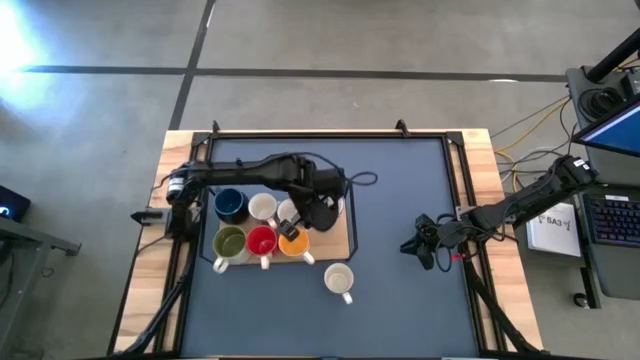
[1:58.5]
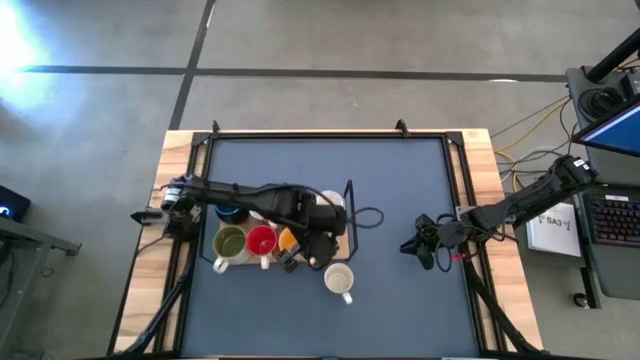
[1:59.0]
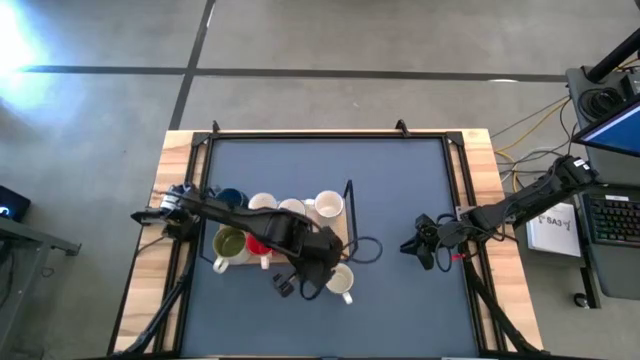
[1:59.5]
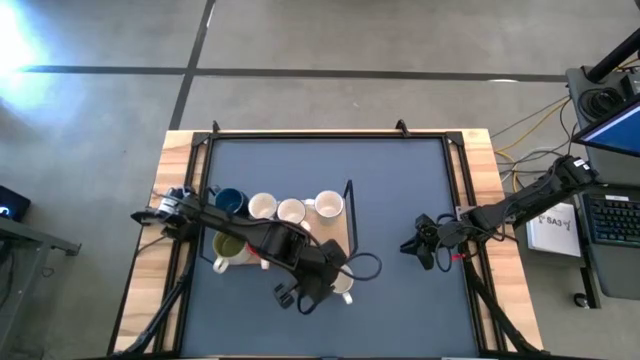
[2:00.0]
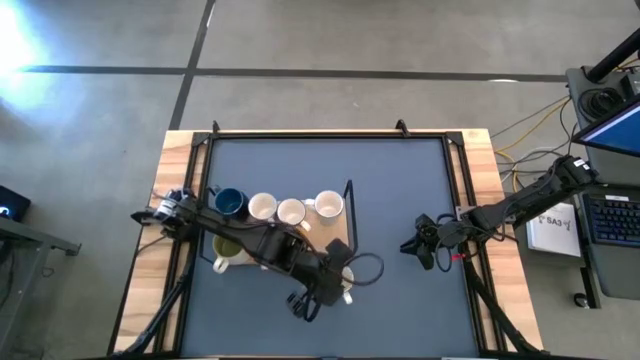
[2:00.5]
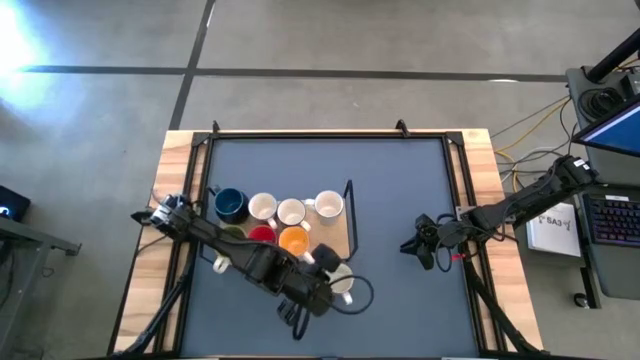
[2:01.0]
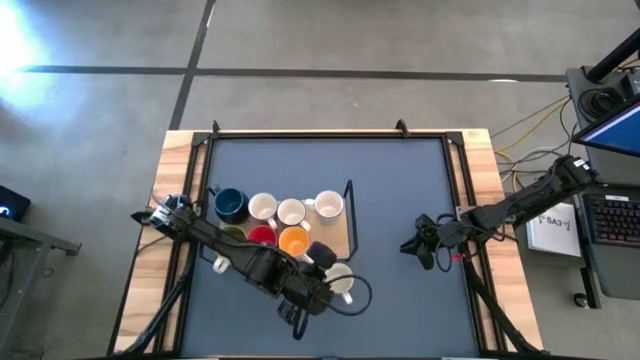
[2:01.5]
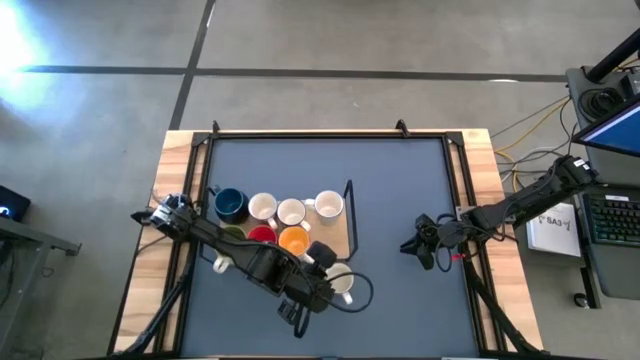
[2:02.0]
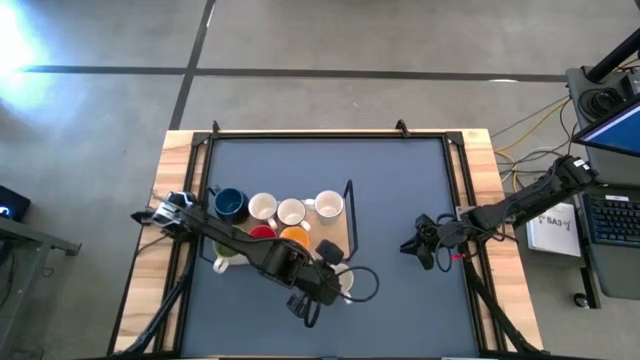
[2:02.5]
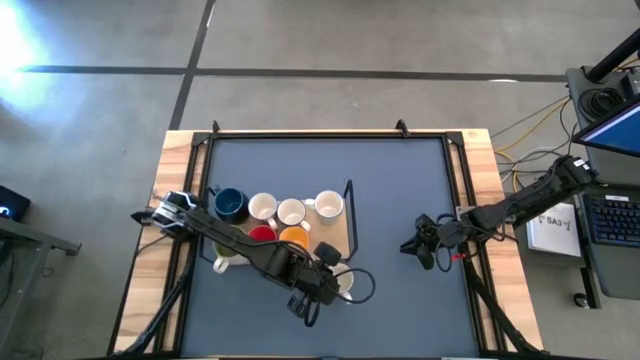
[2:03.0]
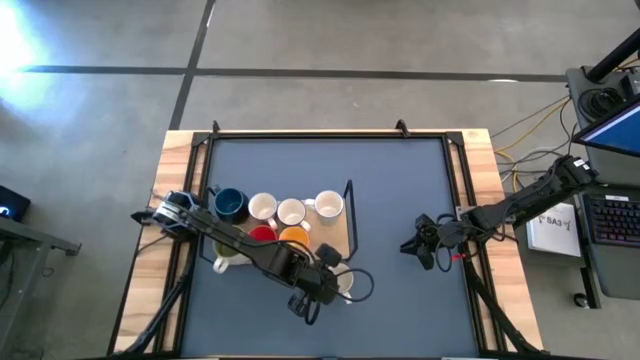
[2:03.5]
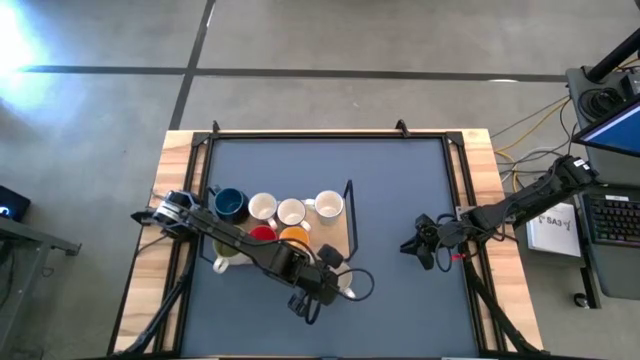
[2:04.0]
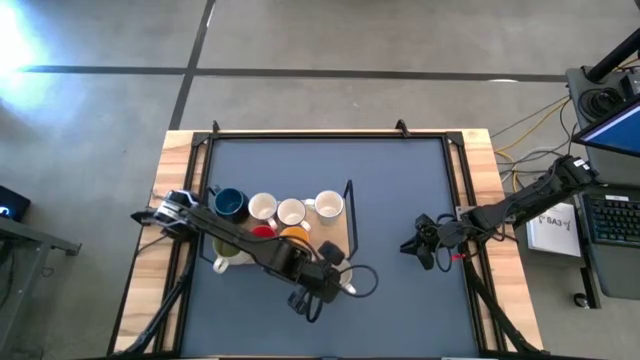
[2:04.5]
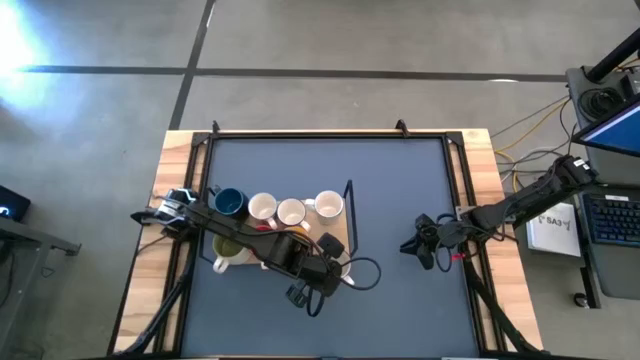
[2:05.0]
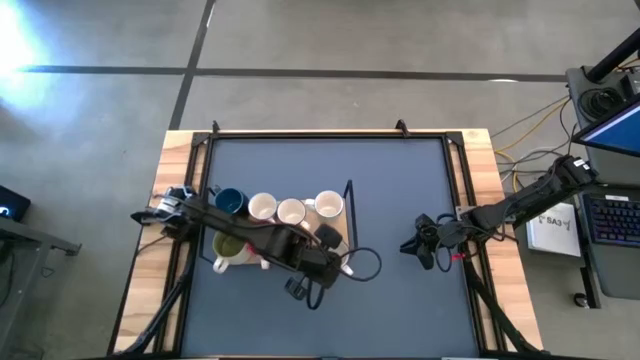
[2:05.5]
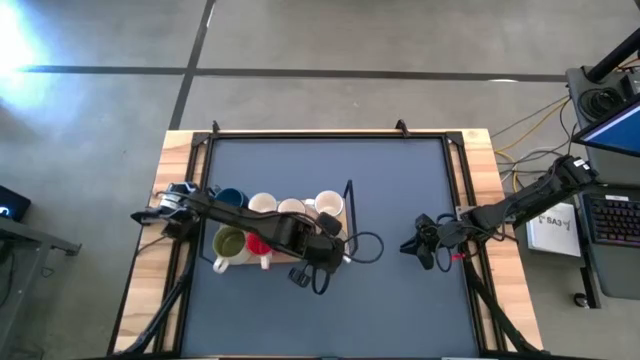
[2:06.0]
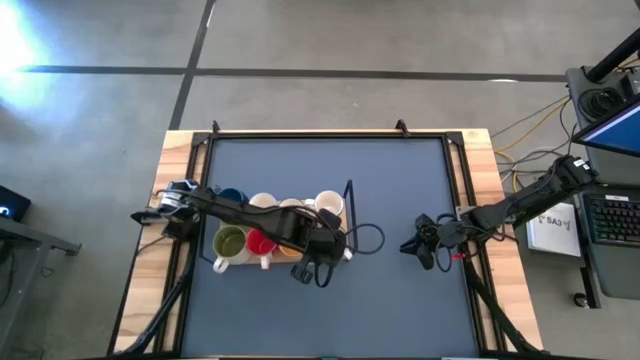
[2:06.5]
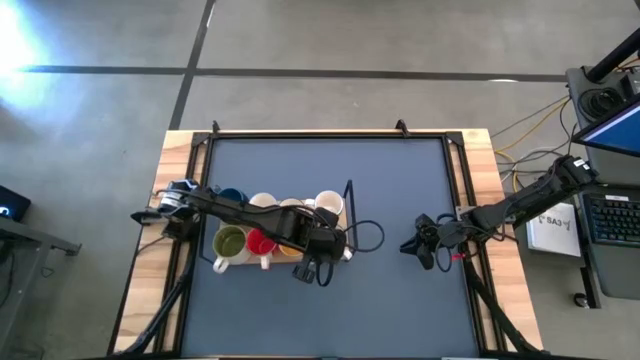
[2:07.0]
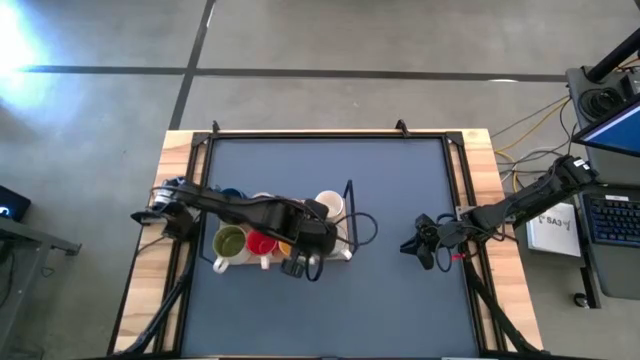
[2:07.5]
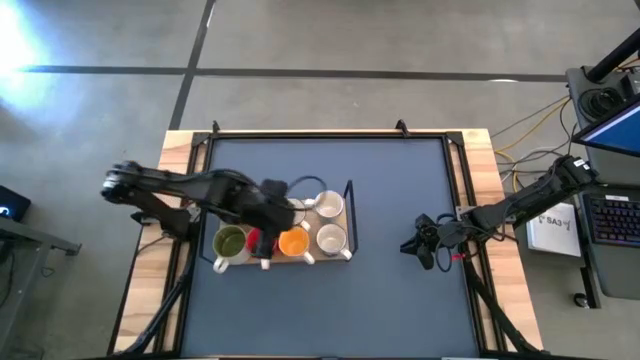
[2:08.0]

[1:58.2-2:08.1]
Task: Place coffee mugs
Put the white blue patterned mug on the shelf

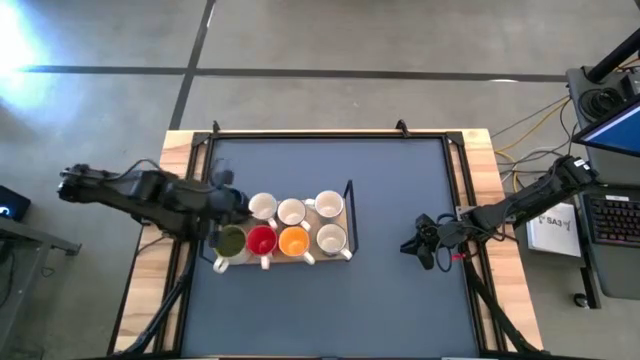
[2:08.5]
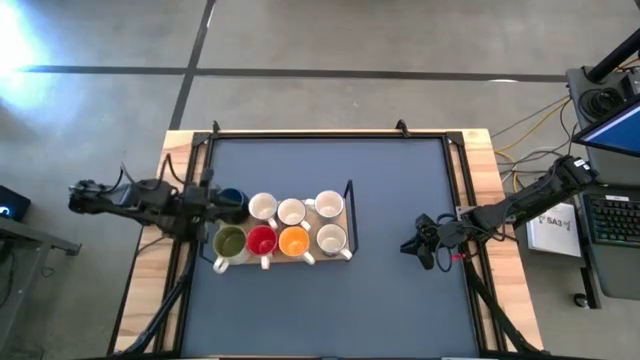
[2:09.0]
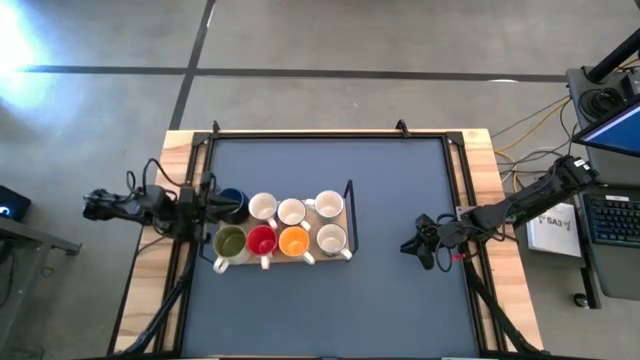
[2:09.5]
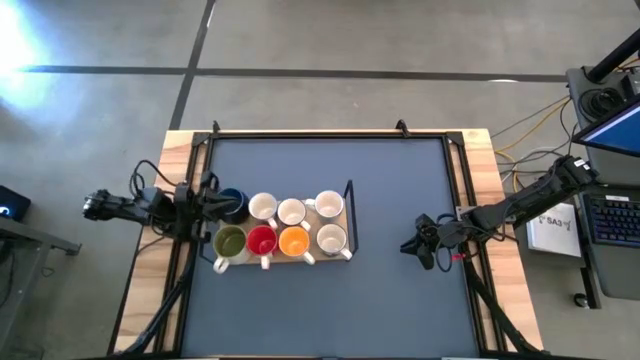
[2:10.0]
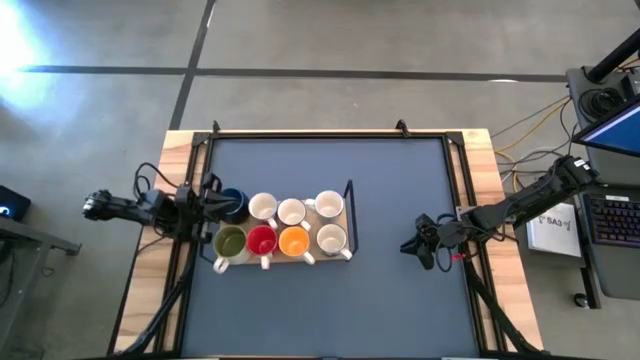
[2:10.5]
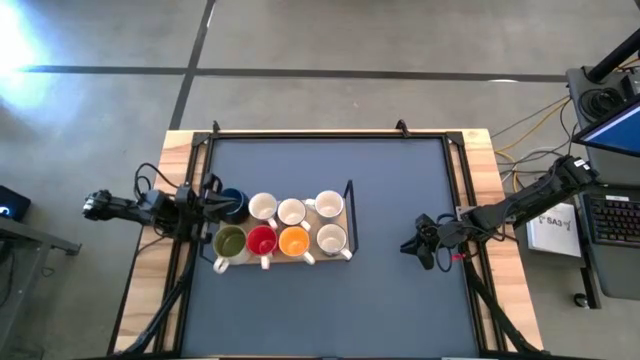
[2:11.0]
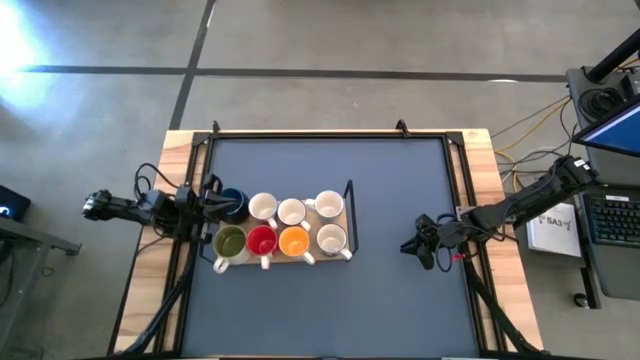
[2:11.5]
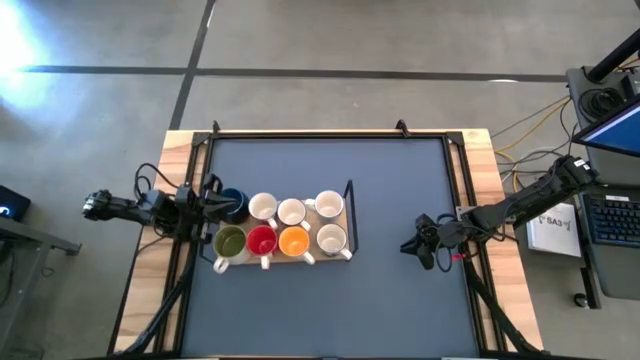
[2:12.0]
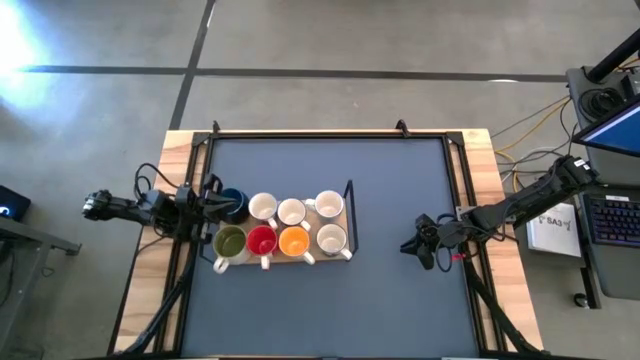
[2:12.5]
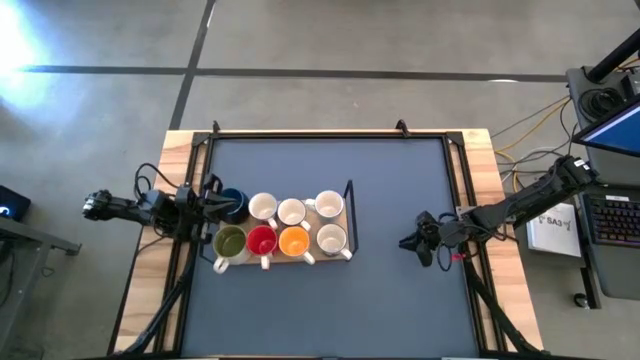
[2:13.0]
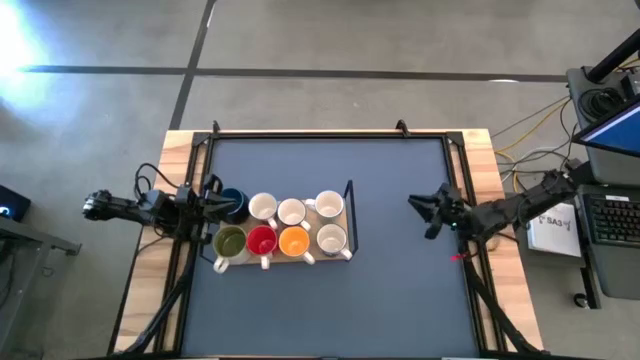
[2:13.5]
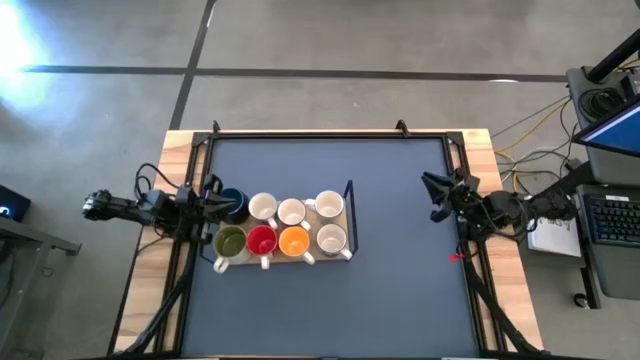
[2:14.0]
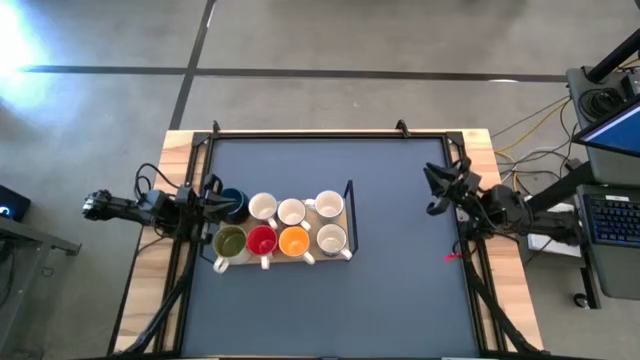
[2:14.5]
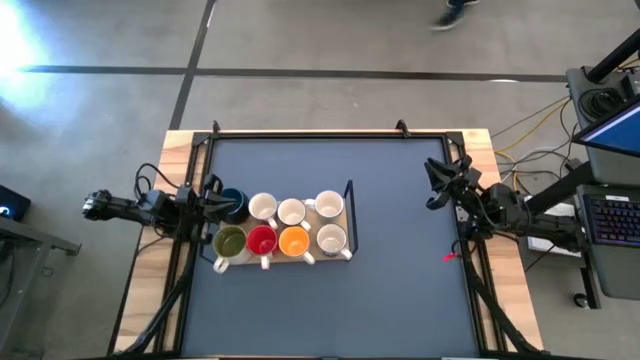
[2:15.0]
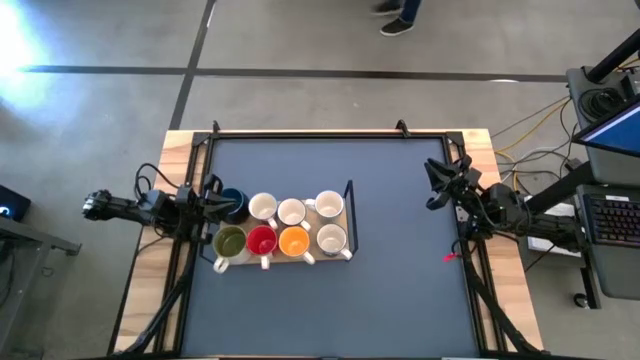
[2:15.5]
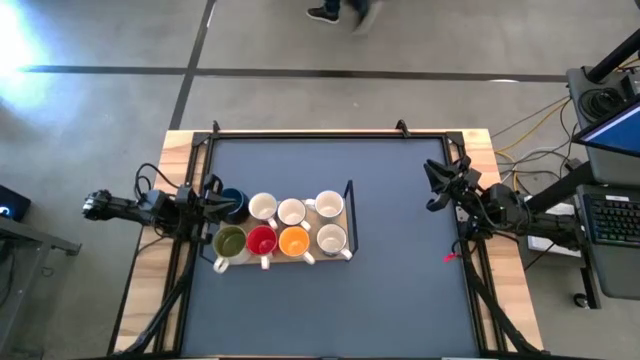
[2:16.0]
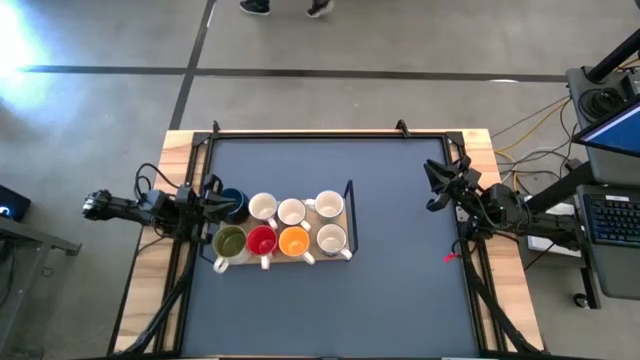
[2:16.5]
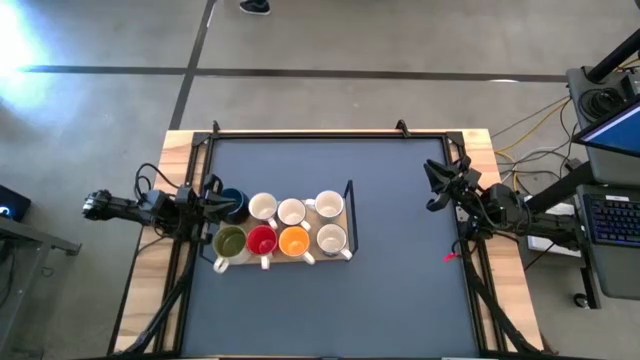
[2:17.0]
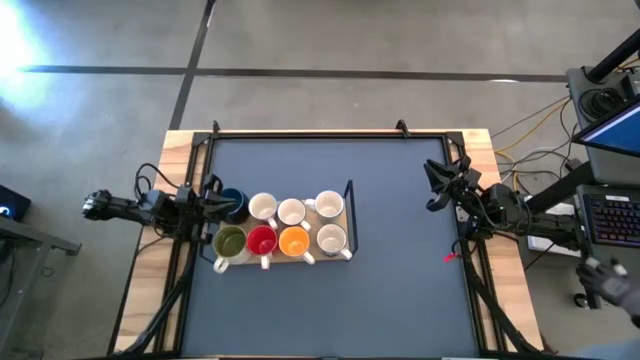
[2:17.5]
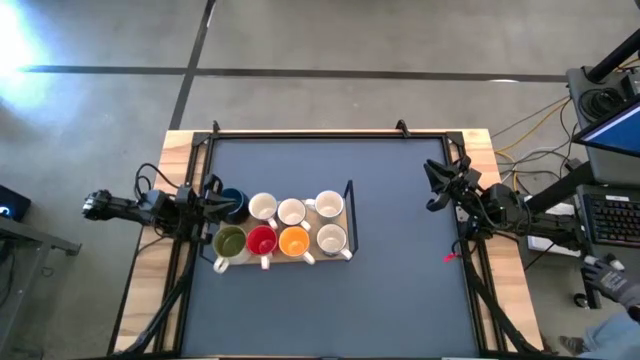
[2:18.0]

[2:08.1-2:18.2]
Return to Home Position

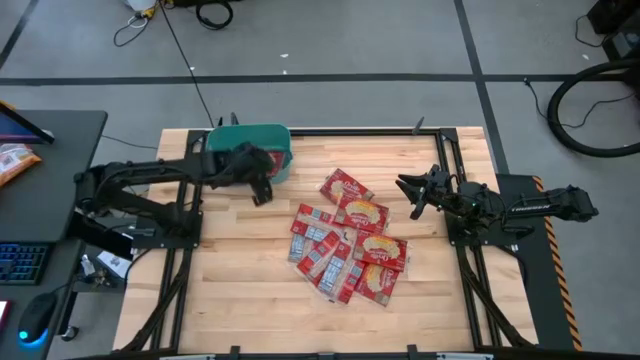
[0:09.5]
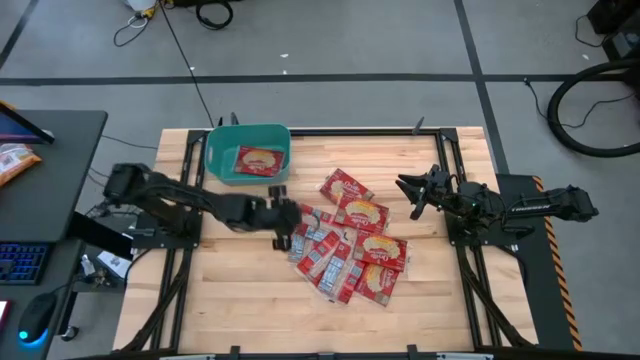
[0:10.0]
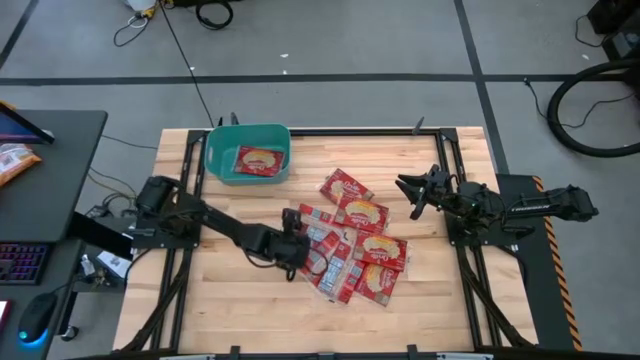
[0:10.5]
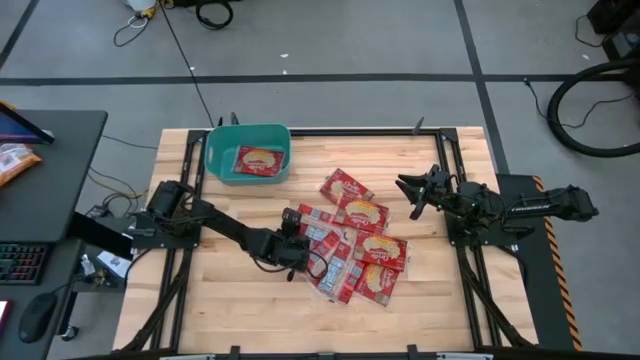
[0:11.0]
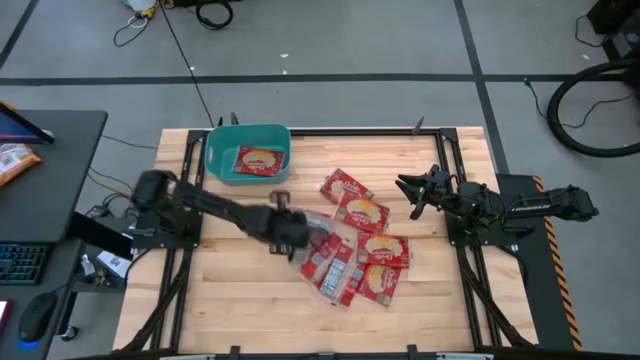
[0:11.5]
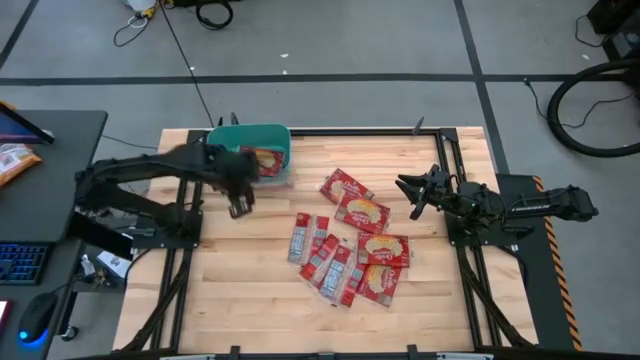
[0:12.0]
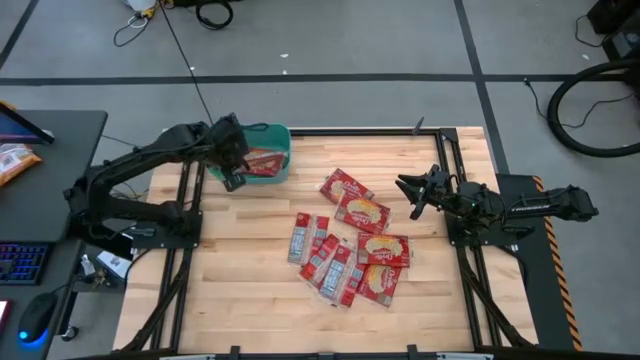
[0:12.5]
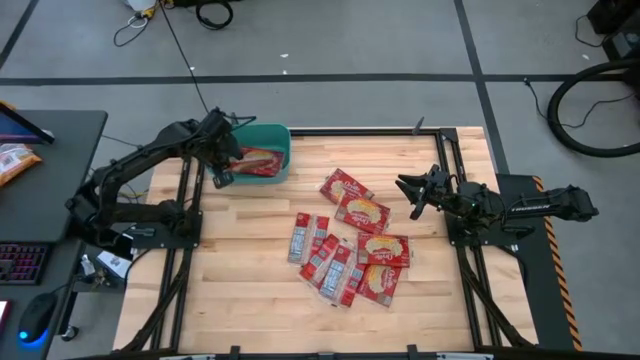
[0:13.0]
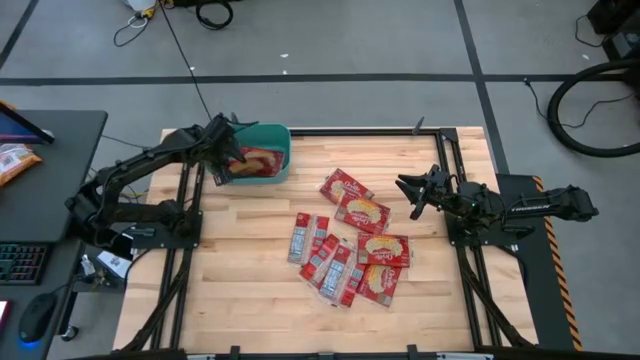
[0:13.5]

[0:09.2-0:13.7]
Task: Sort popcorn bags into baskets
Put the red popcorn bag into the blue bin
